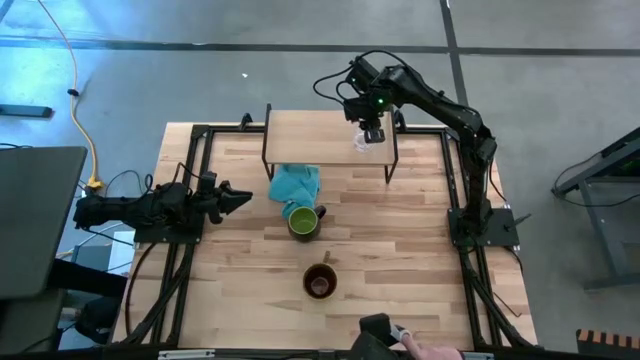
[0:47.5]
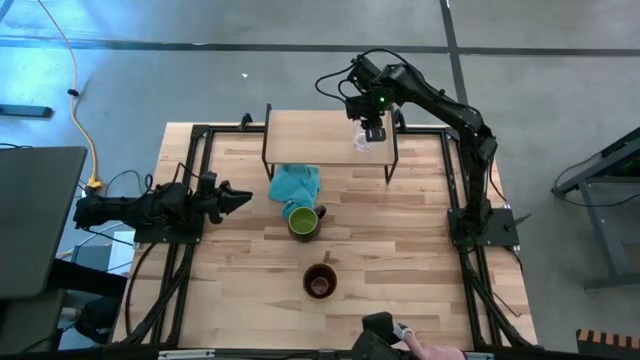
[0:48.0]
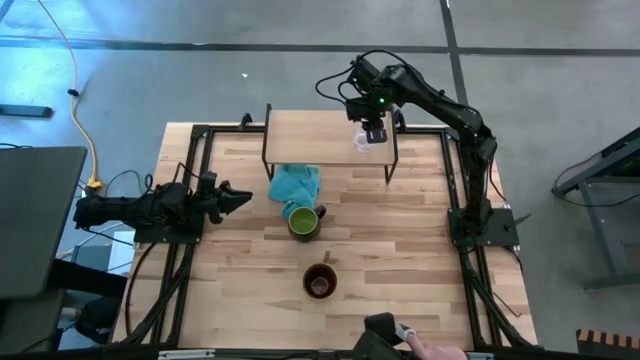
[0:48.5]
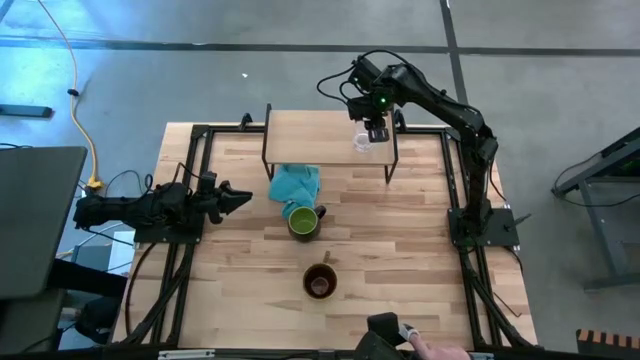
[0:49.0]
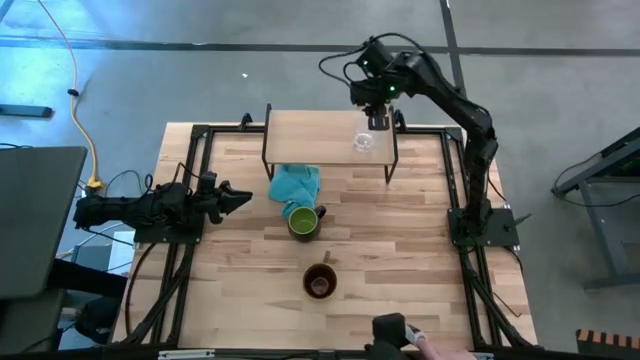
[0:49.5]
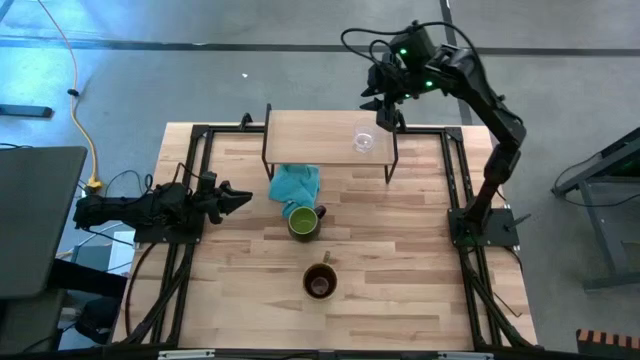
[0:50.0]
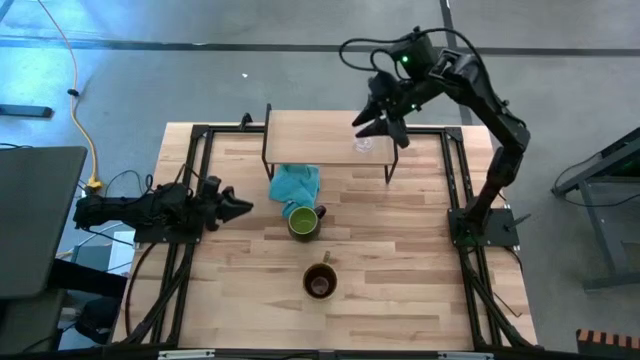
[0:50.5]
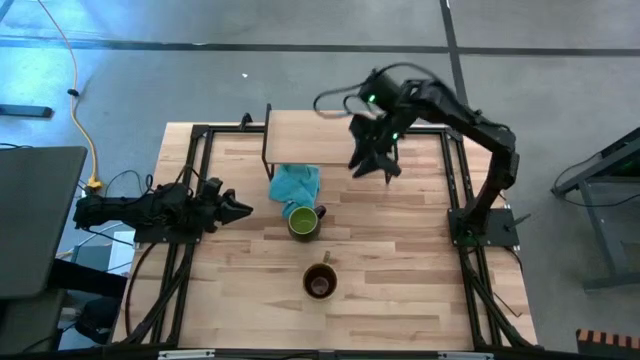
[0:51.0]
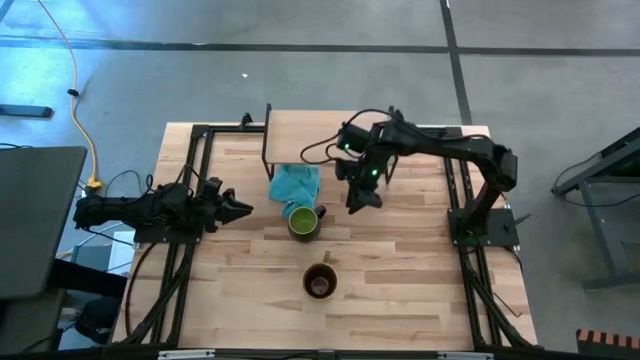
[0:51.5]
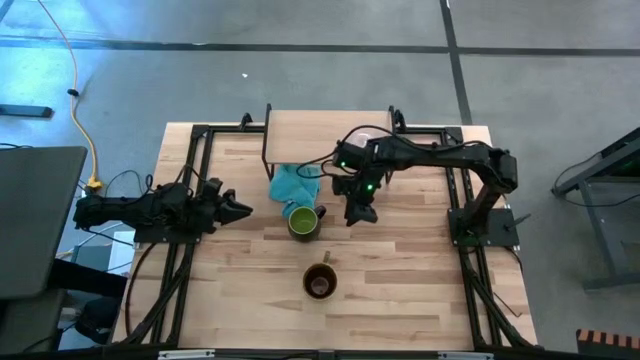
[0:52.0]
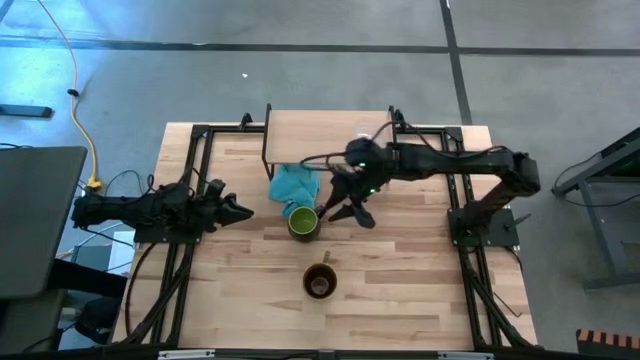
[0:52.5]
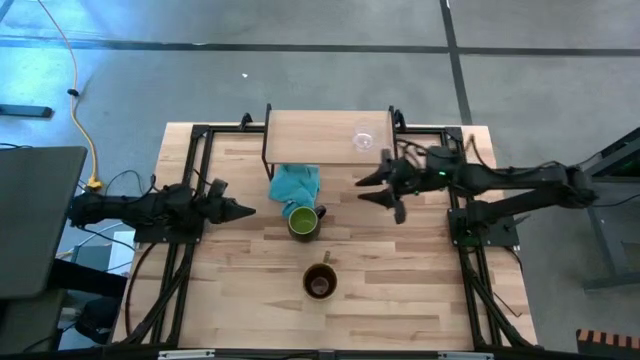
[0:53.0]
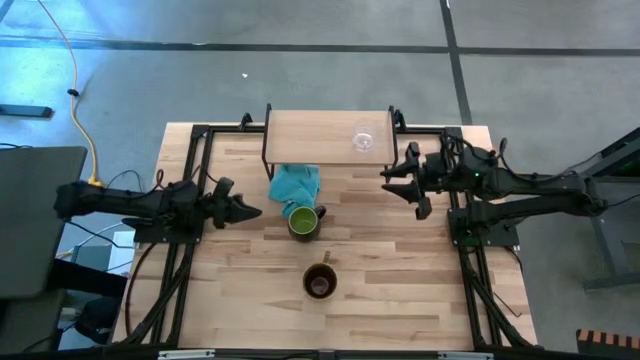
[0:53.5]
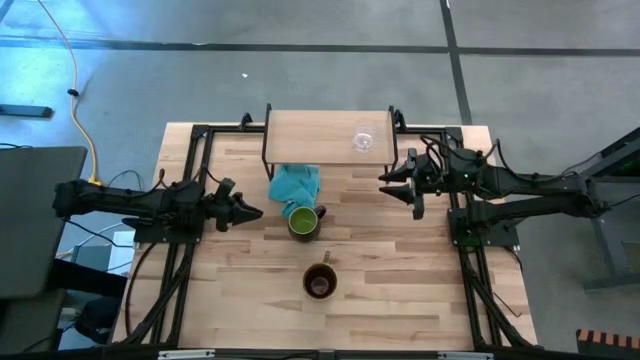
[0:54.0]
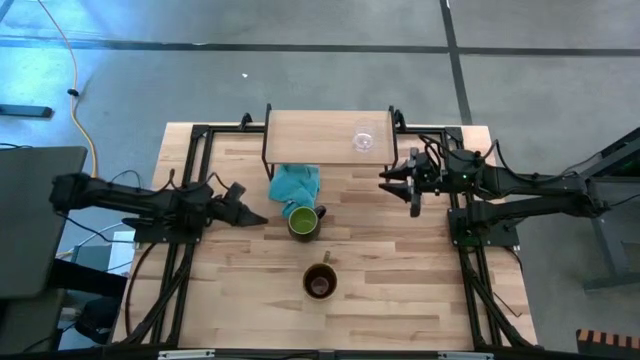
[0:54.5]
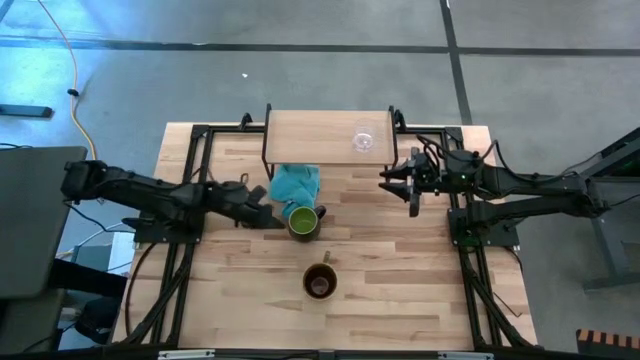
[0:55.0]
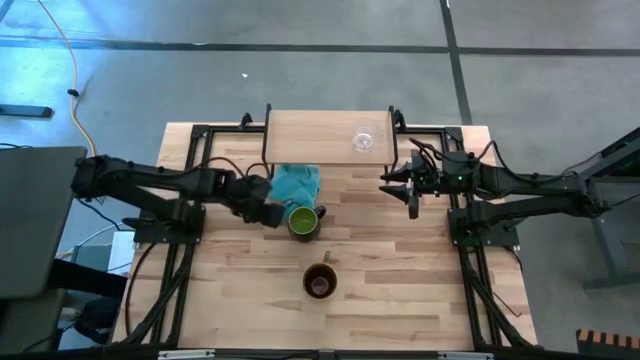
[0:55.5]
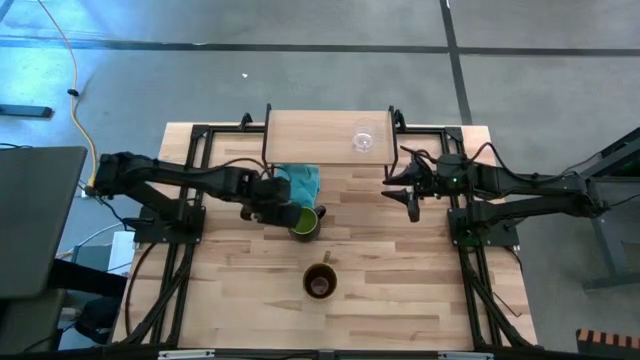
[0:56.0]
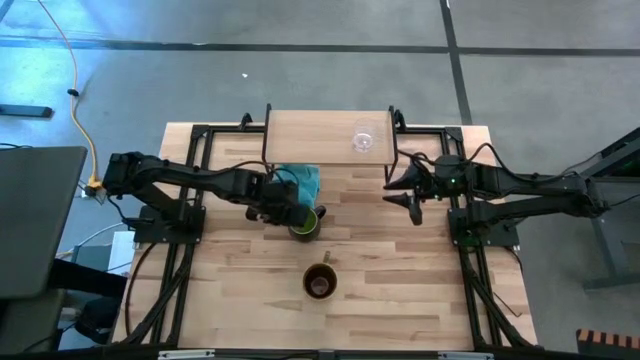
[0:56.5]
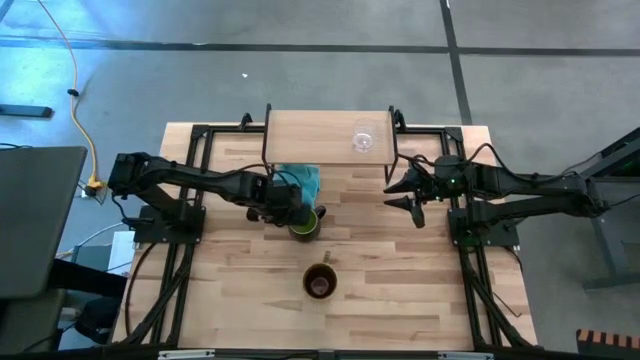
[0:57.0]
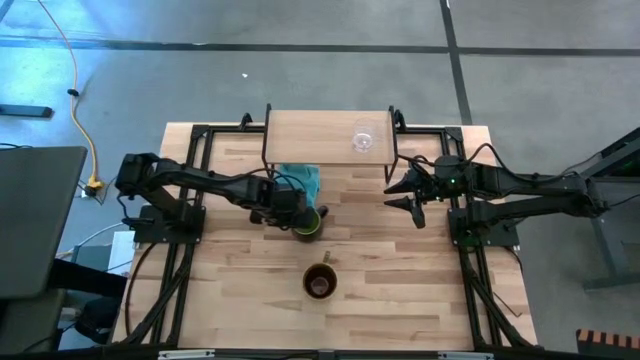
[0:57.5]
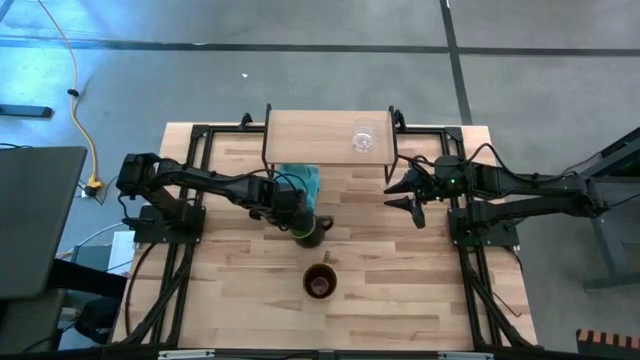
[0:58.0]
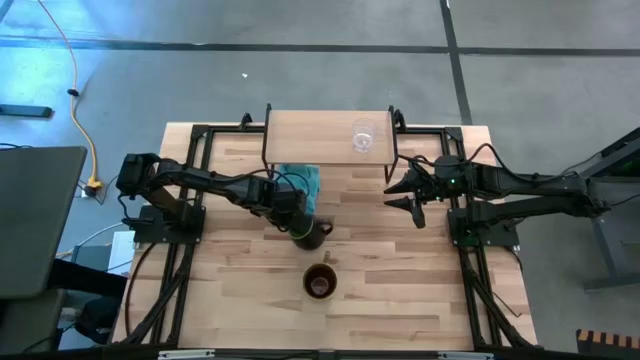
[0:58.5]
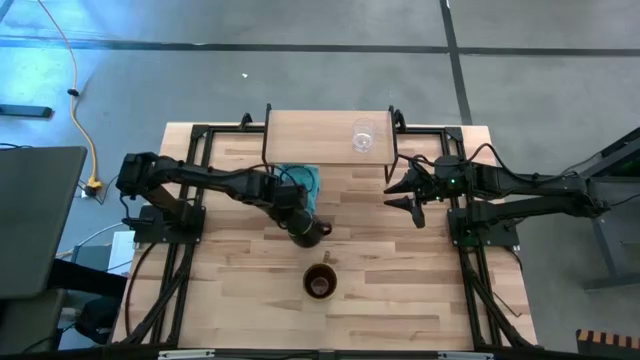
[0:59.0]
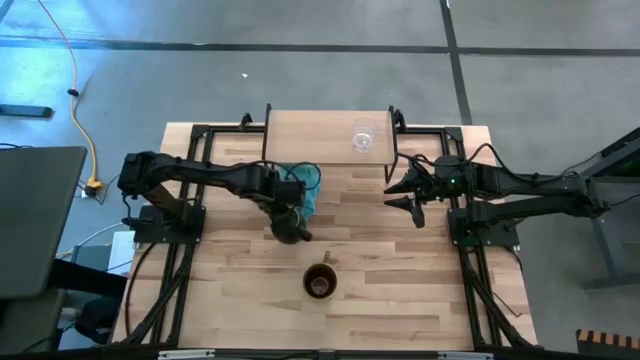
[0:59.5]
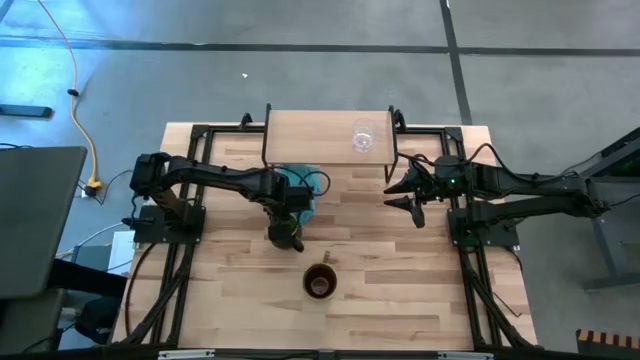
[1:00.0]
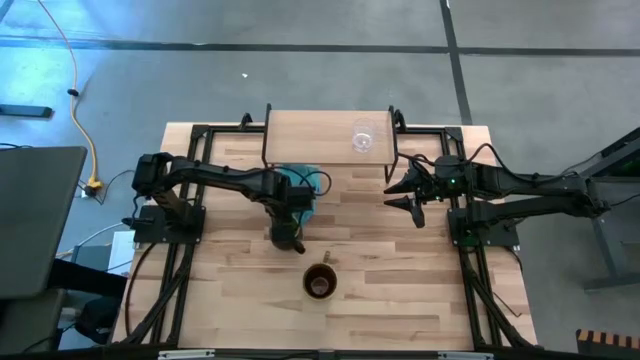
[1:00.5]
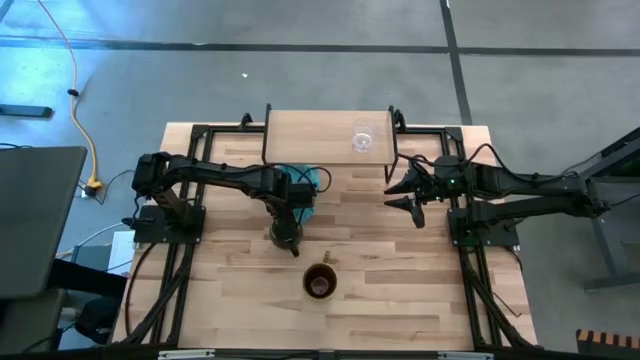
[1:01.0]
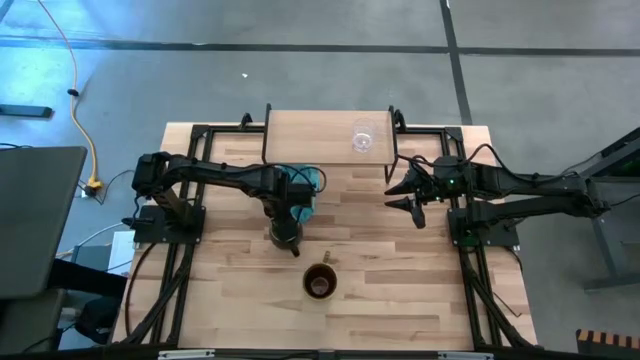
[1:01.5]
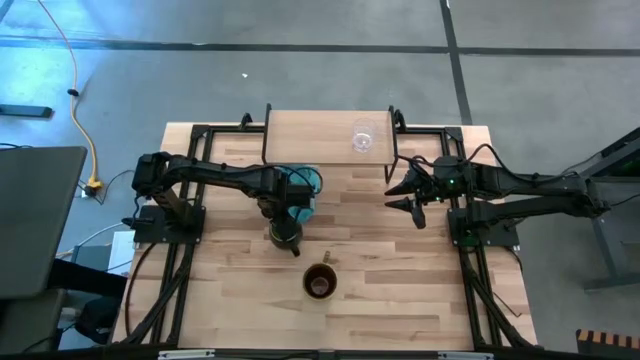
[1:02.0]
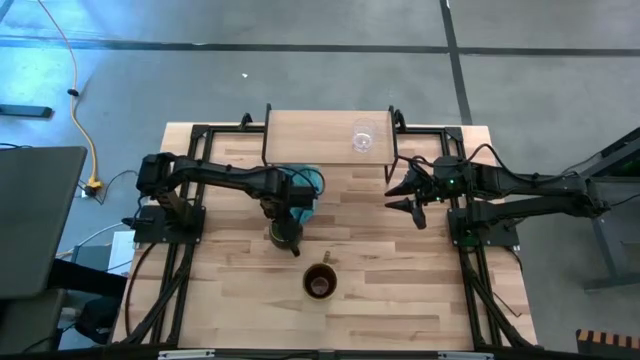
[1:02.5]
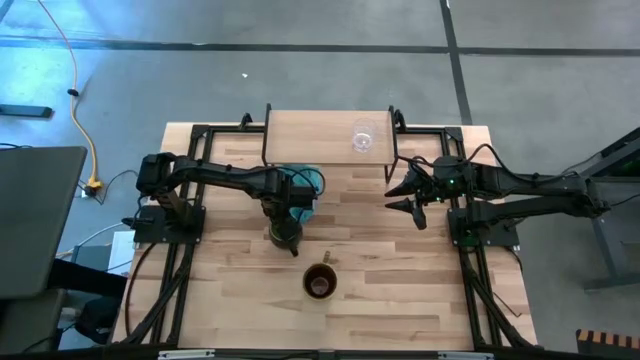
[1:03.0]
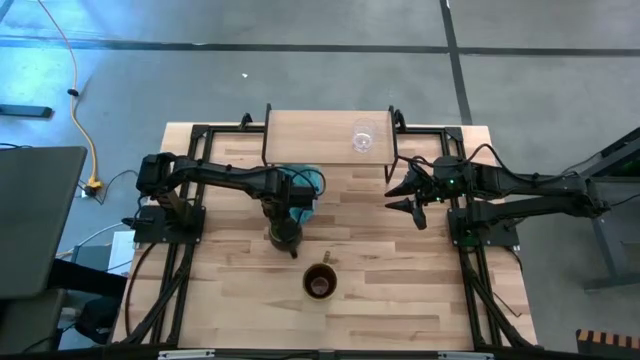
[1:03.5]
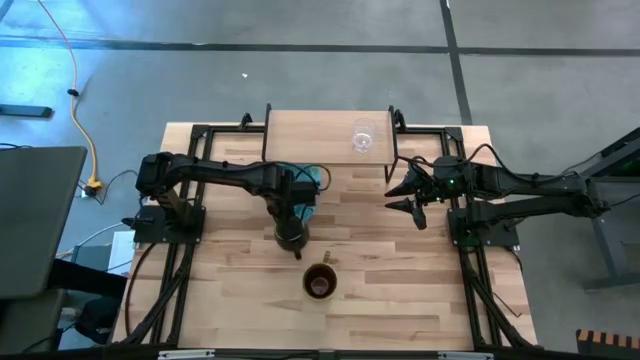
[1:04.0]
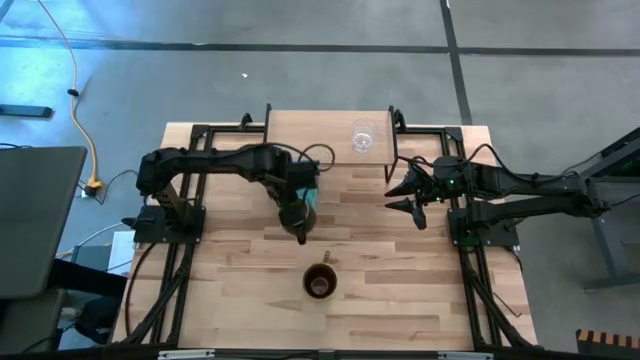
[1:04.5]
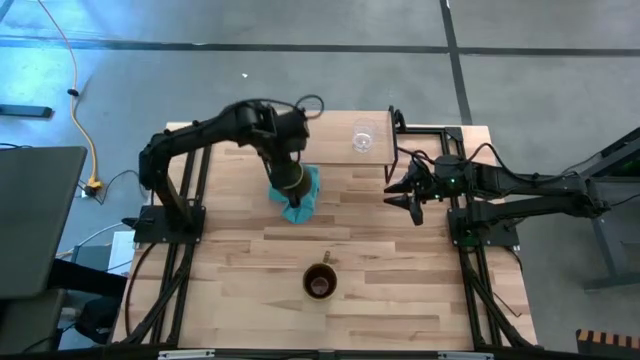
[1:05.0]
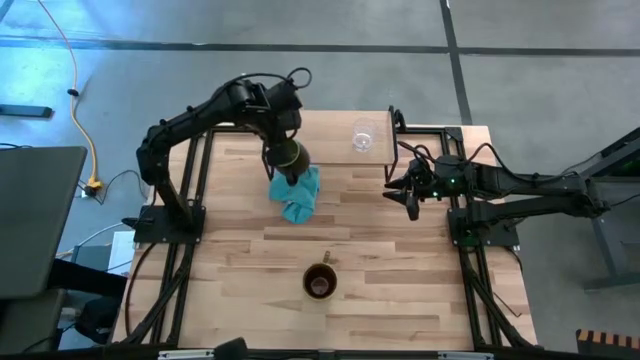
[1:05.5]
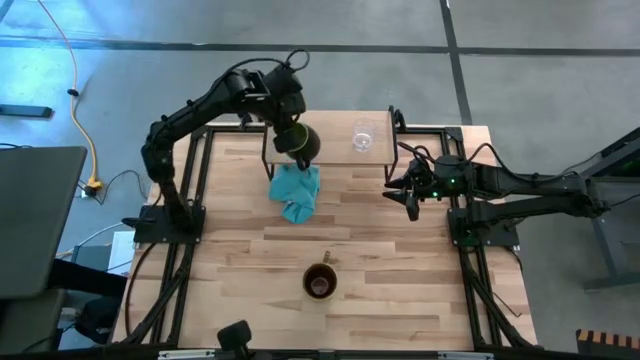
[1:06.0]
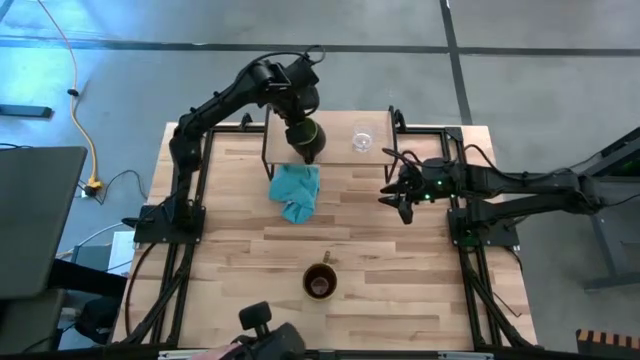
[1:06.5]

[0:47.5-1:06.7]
Task: Stack small to large cups/mugs on shelf
Put the black mug on the shelf

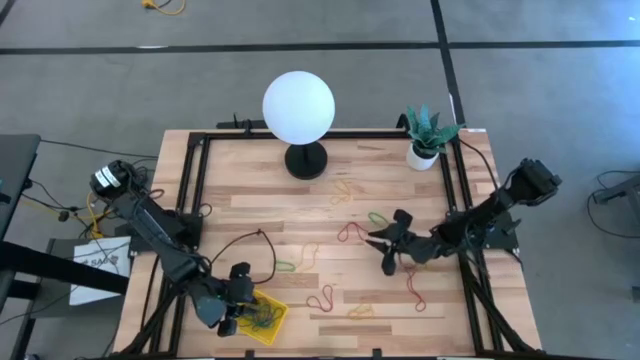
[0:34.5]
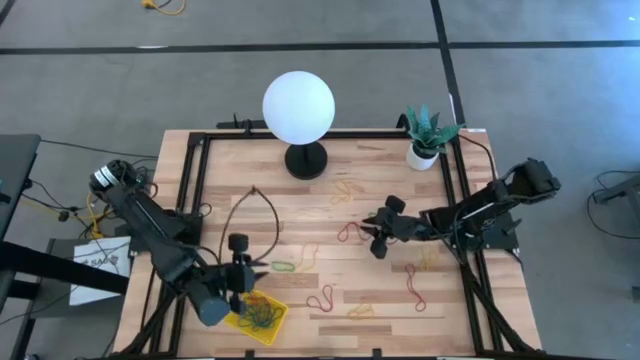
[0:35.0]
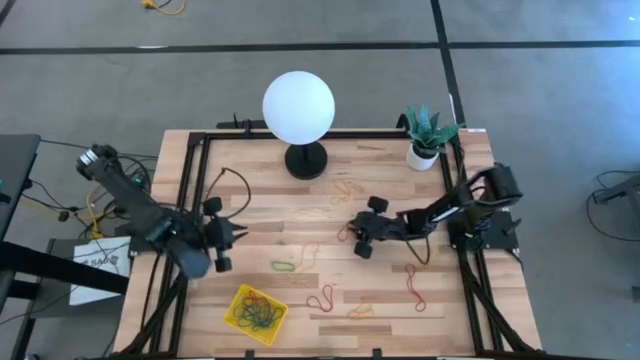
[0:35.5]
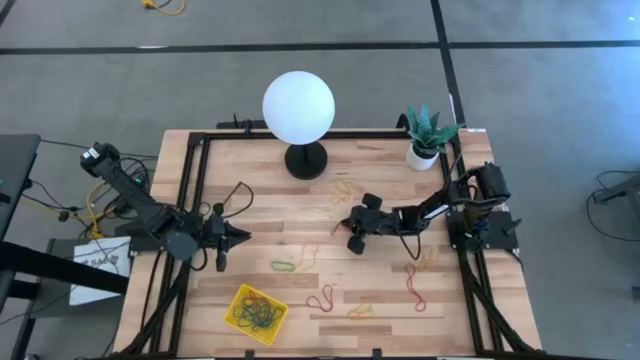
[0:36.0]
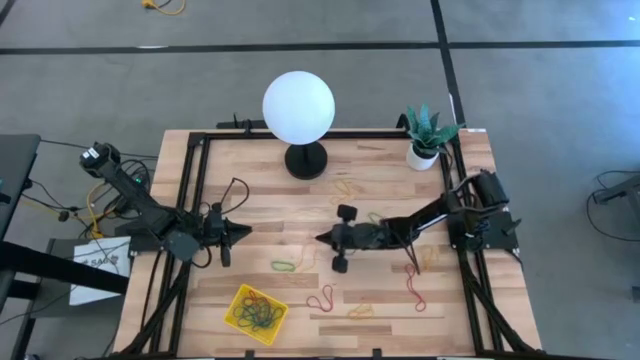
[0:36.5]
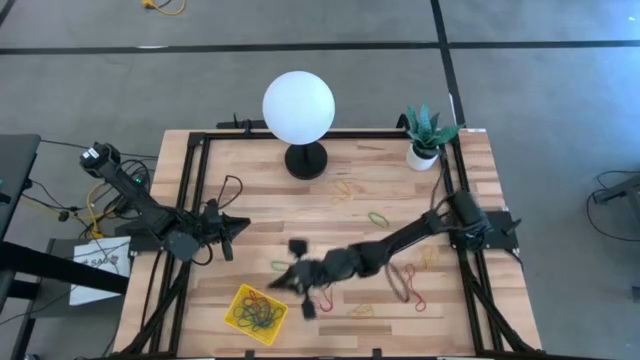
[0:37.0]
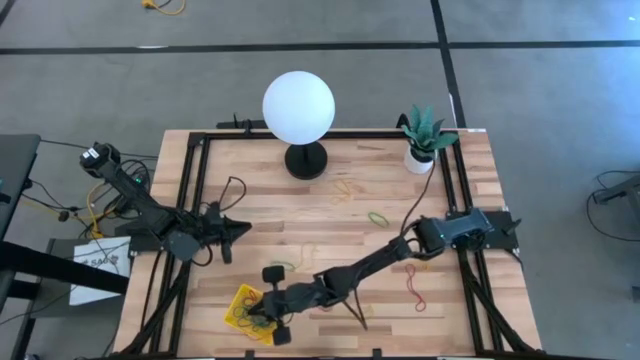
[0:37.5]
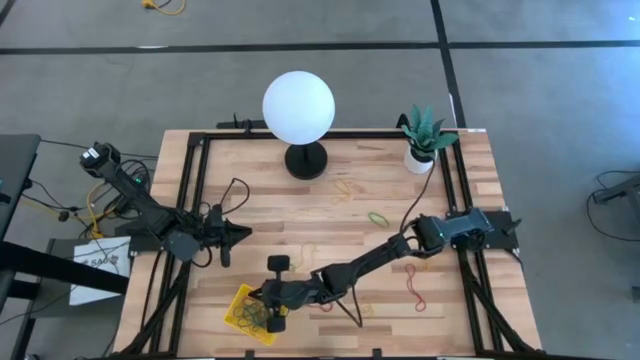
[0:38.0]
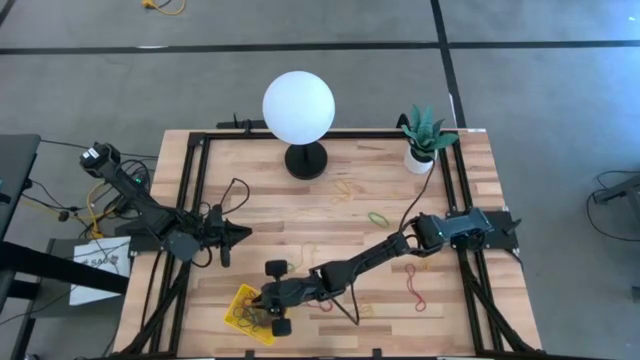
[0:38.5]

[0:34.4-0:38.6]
Task: Pick and place items into bin
Put the red rubber band into the yellow bin
